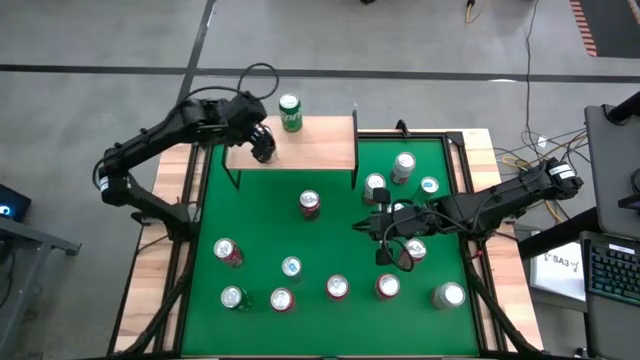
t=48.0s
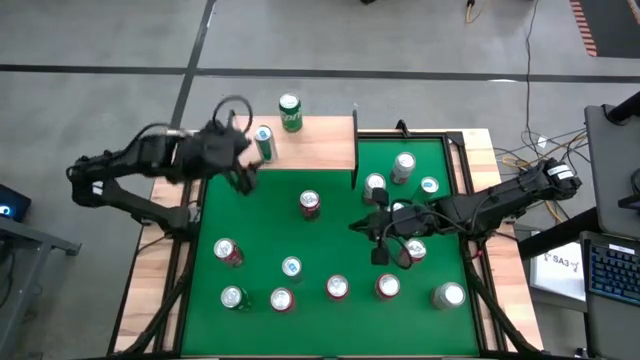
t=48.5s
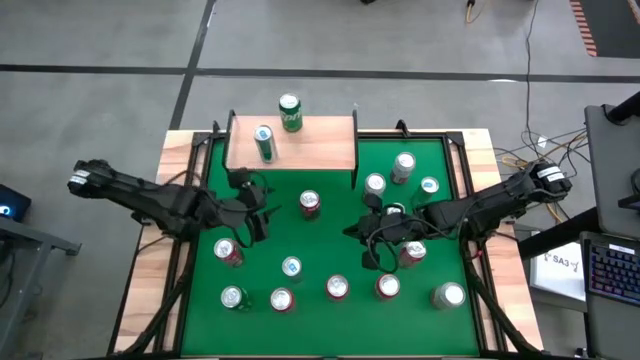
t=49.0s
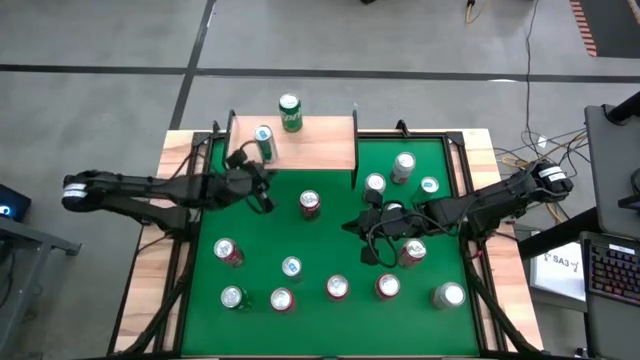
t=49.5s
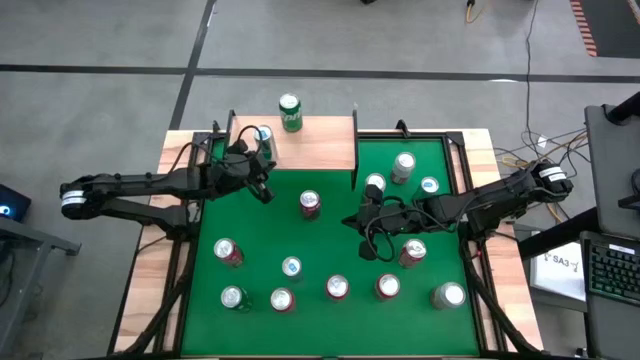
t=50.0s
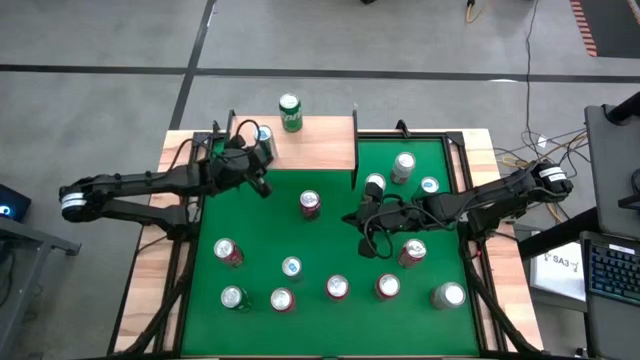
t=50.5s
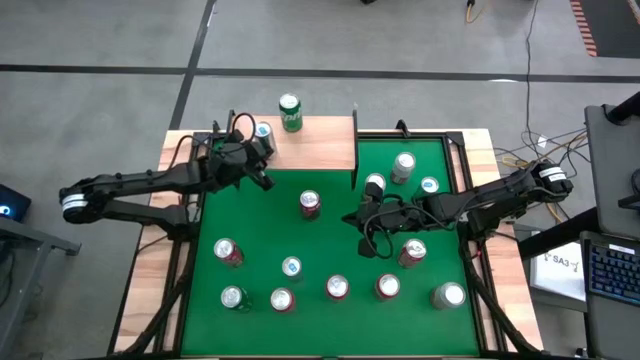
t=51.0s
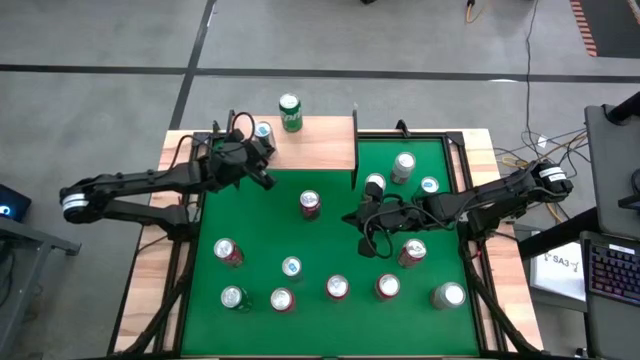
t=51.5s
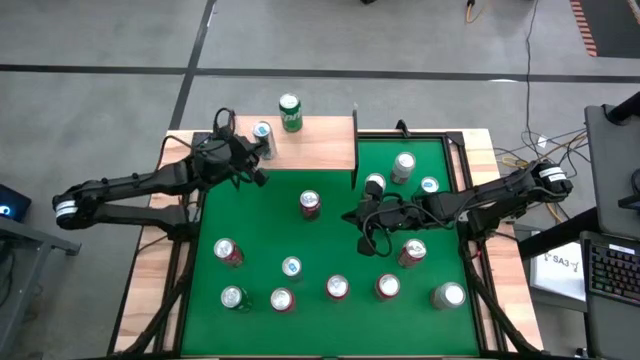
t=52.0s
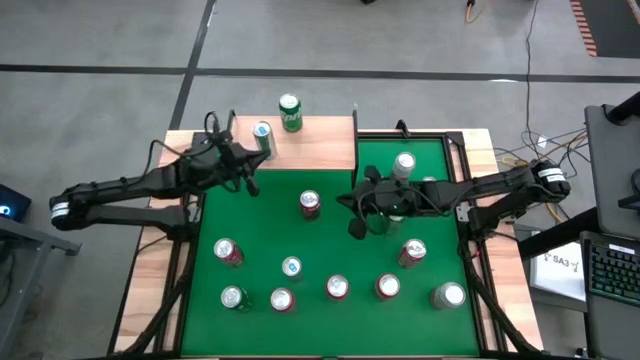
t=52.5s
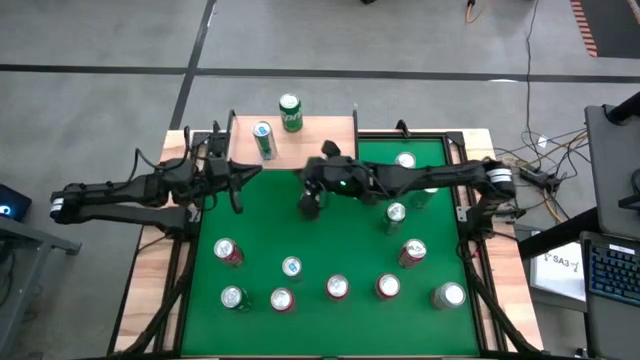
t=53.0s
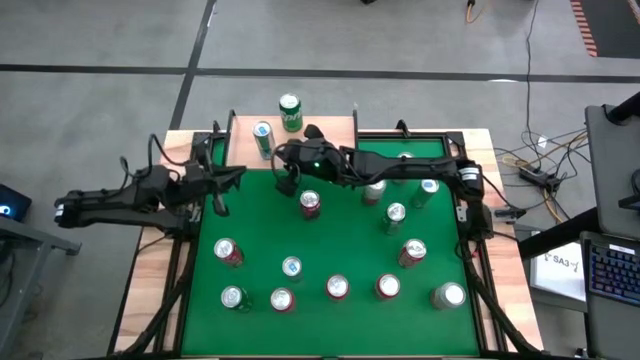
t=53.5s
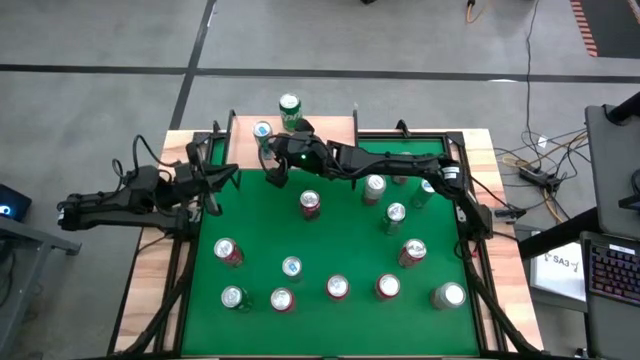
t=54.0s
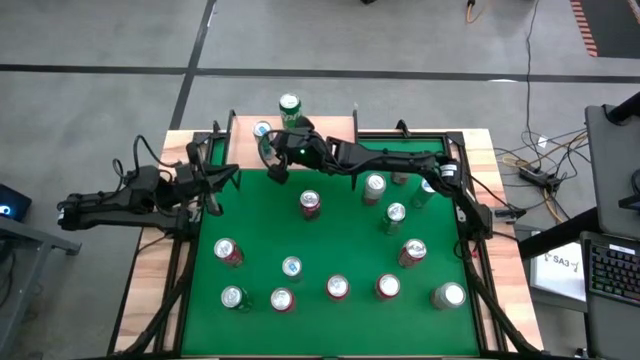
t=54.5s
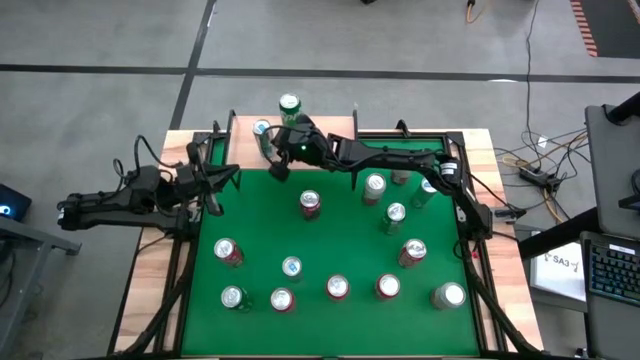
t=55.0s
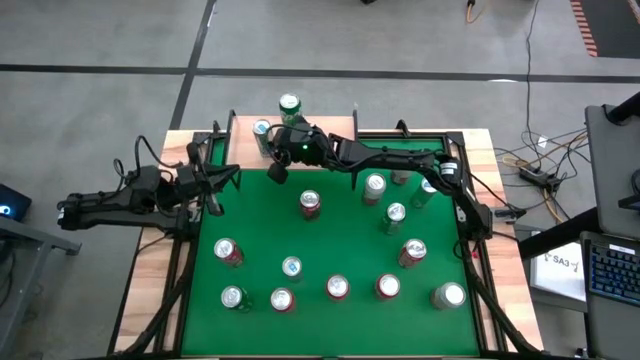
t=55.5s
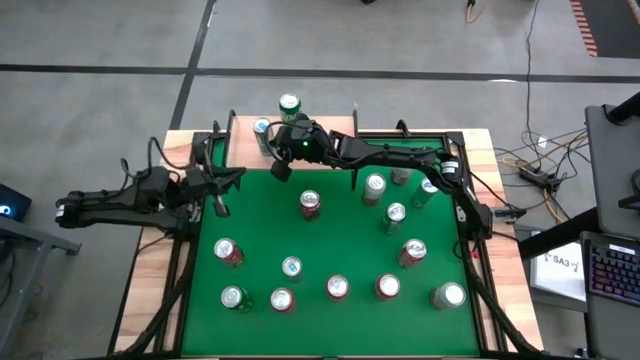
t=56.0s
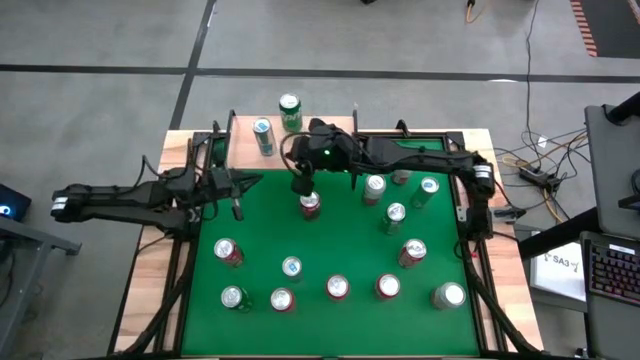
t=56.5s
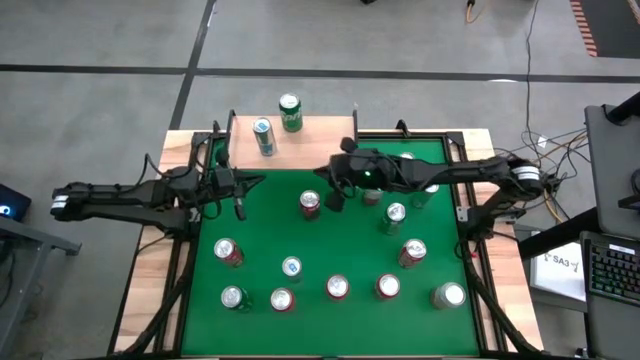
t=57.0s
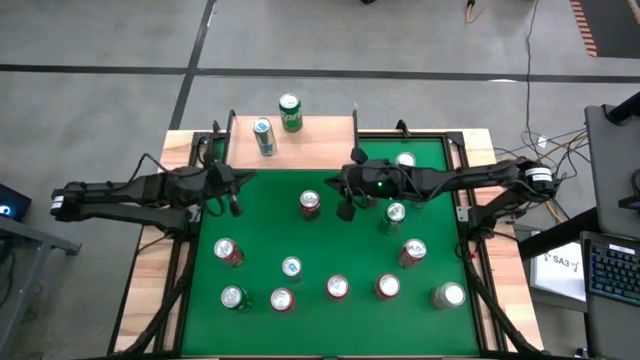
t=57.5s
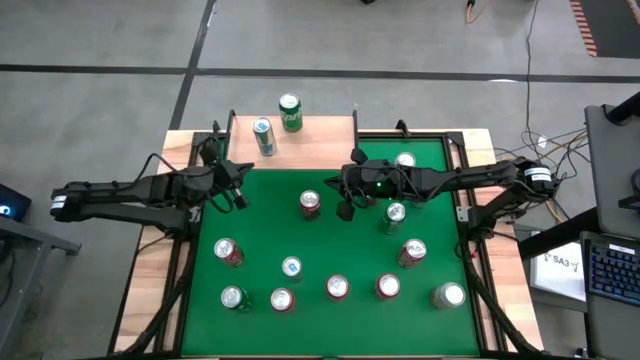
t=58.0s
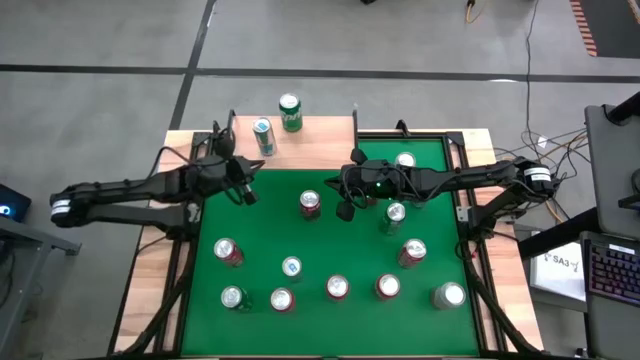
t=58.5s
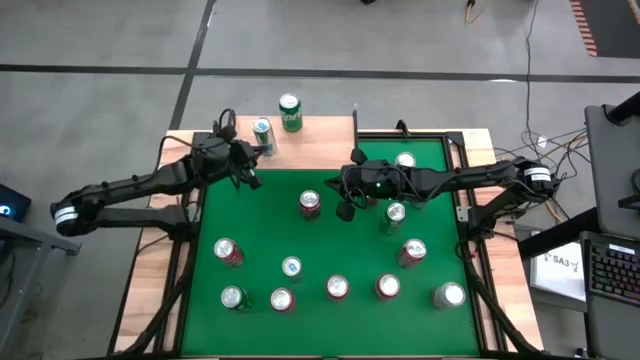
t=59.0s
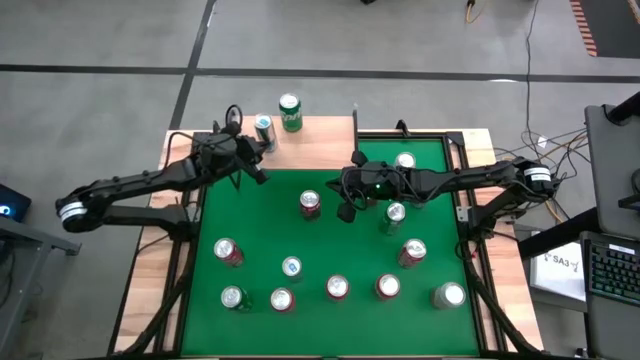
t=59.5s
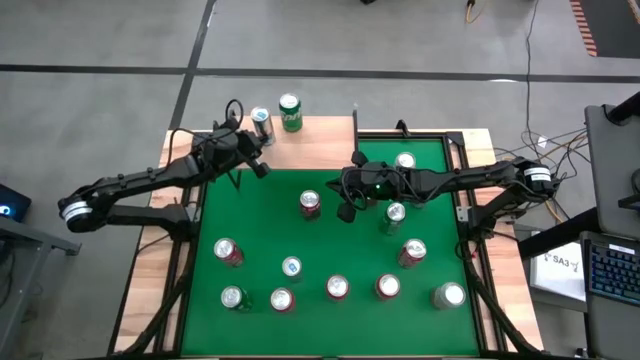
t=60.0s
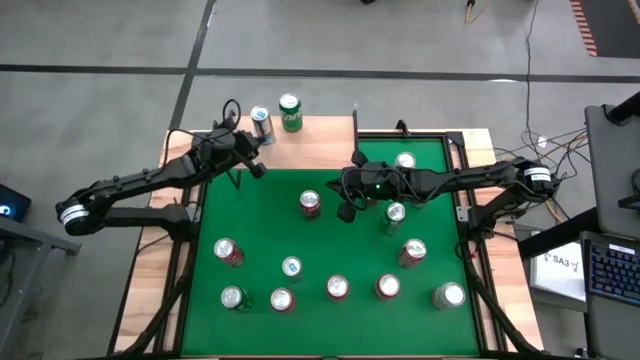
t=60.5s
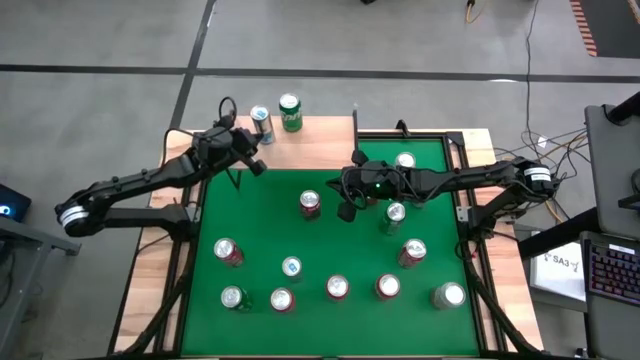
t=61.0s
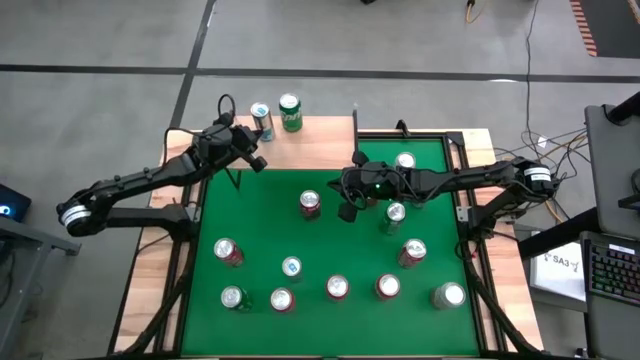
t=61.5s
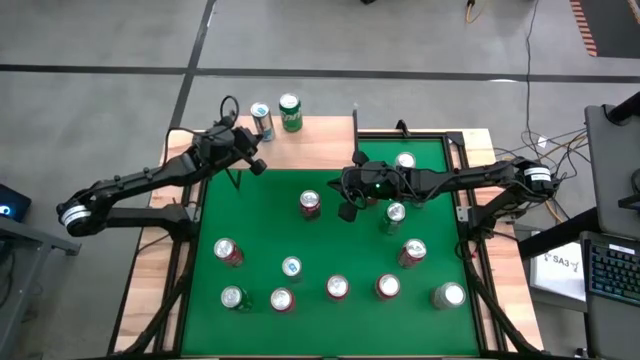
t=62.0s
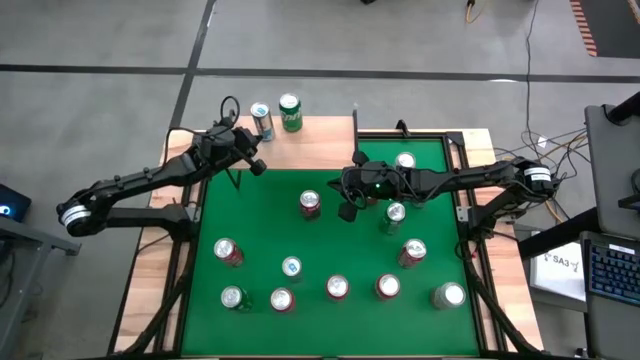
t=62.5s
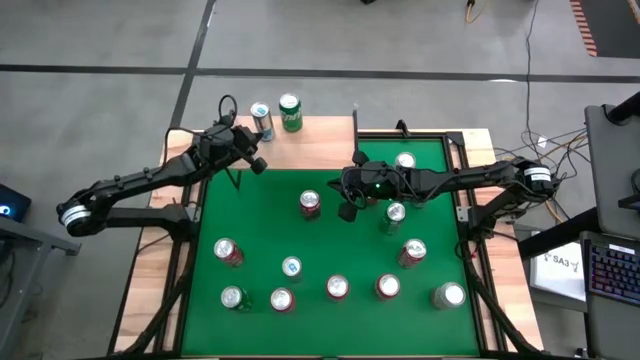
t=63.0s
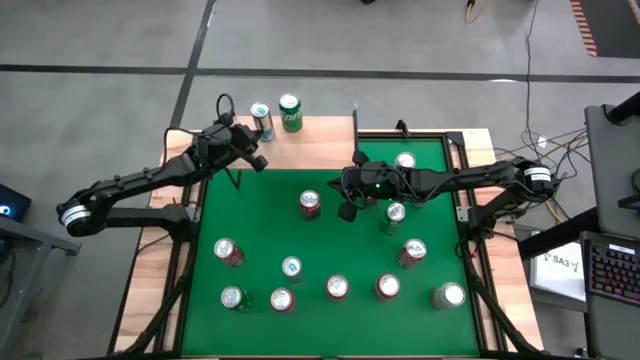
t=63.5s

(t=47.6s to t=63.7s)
Task: Place canned beverage on shelf
Put the red can on the shelf
